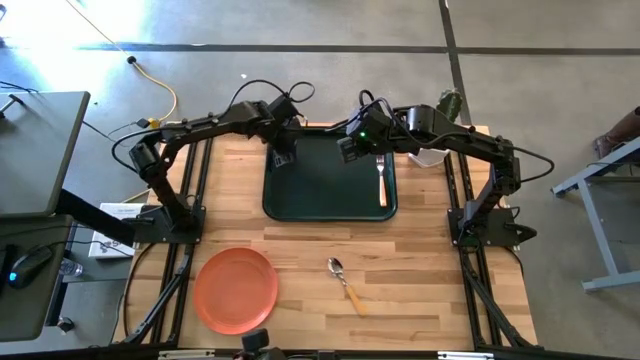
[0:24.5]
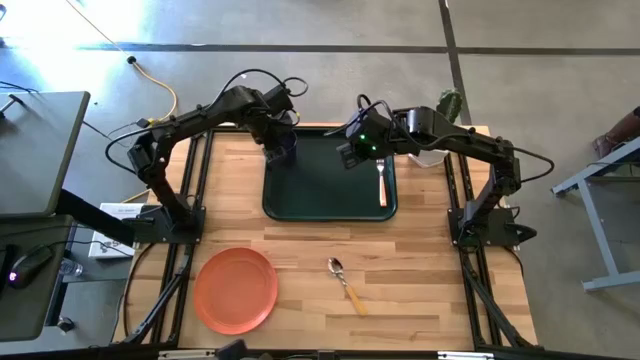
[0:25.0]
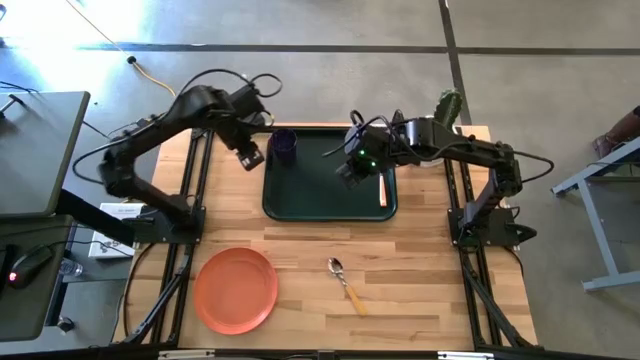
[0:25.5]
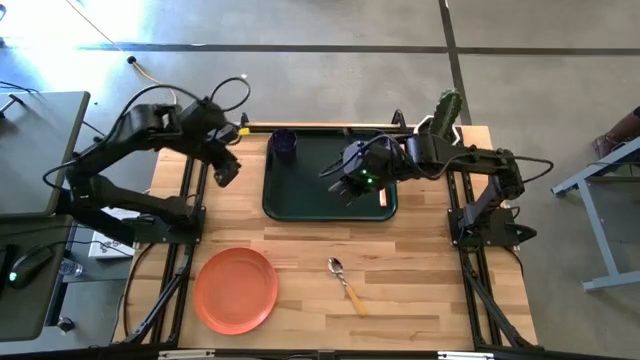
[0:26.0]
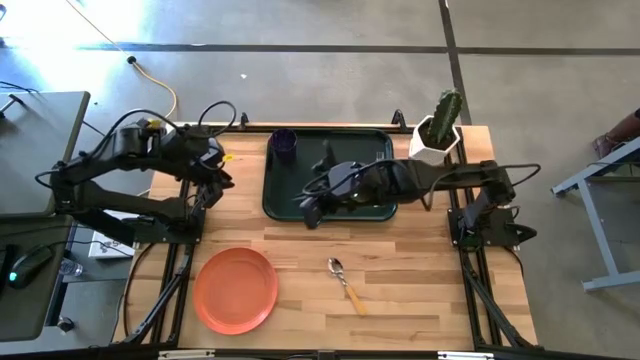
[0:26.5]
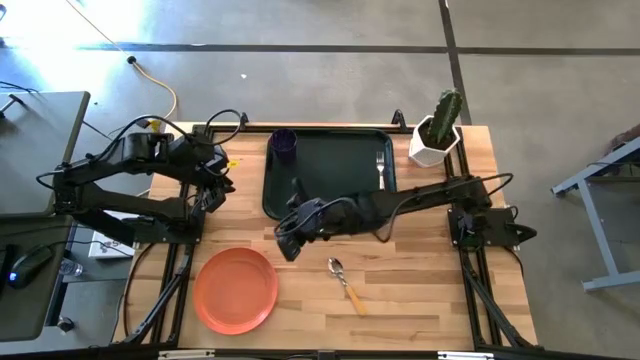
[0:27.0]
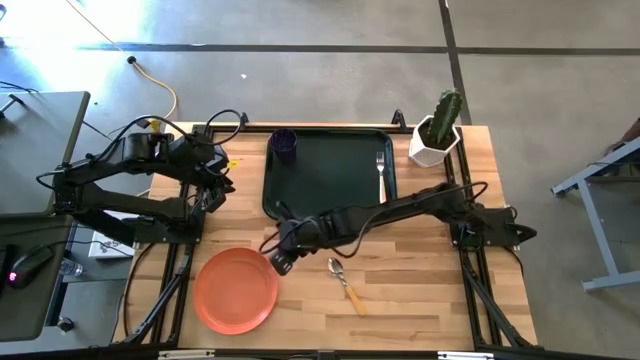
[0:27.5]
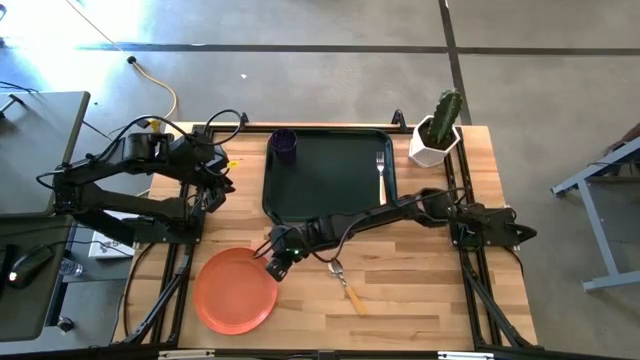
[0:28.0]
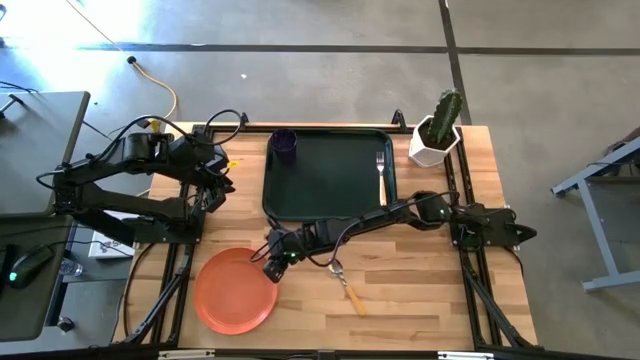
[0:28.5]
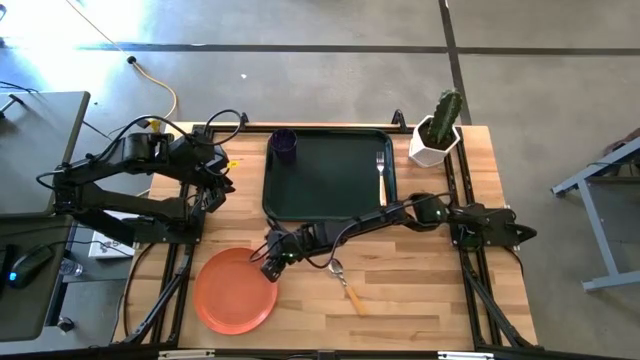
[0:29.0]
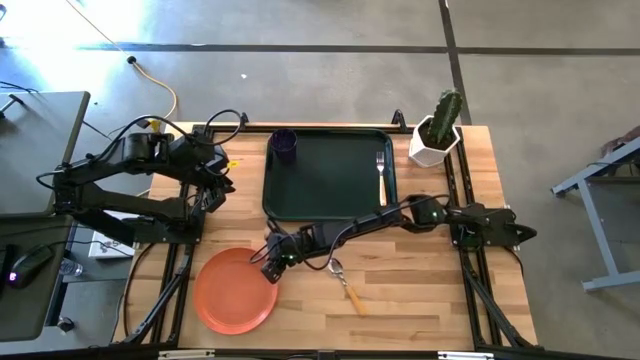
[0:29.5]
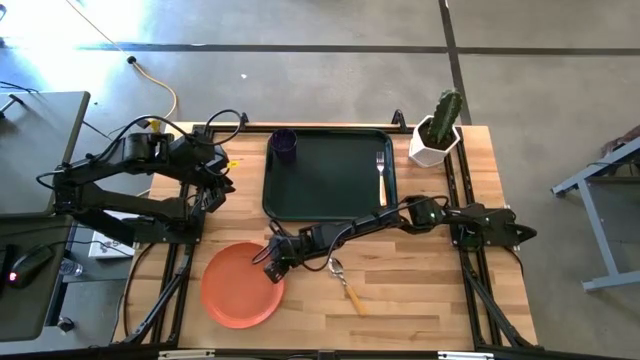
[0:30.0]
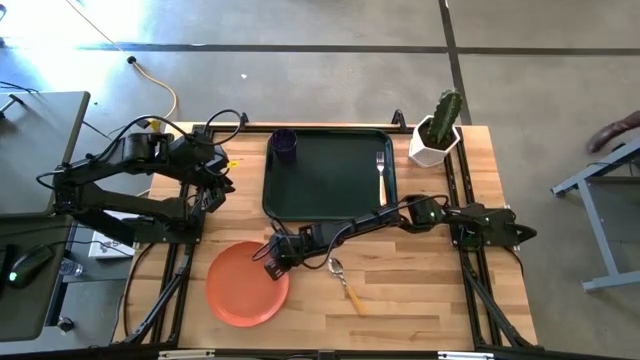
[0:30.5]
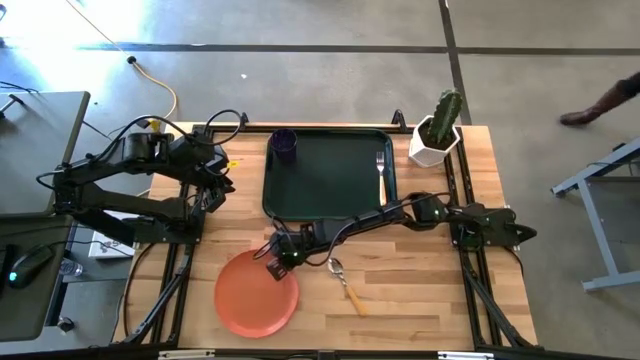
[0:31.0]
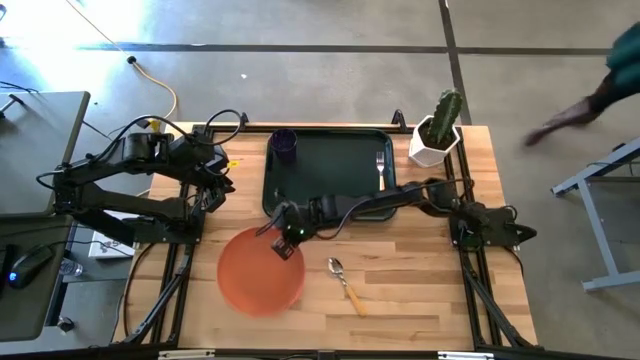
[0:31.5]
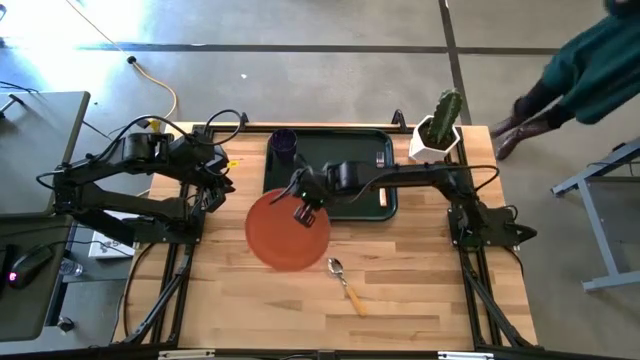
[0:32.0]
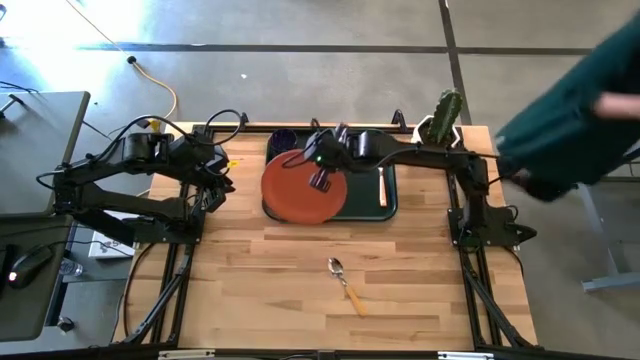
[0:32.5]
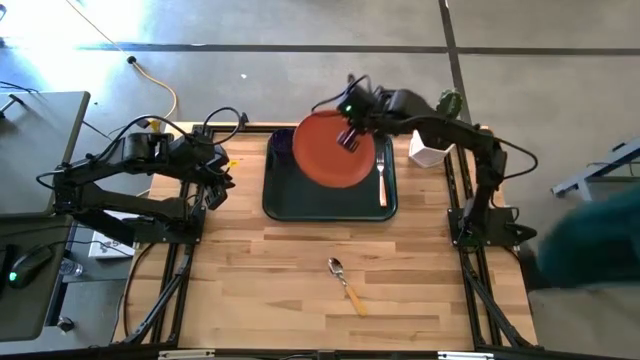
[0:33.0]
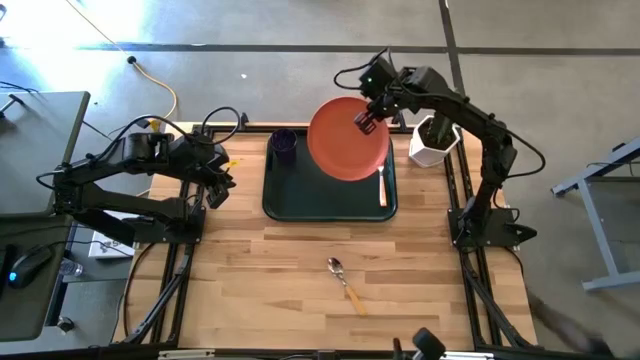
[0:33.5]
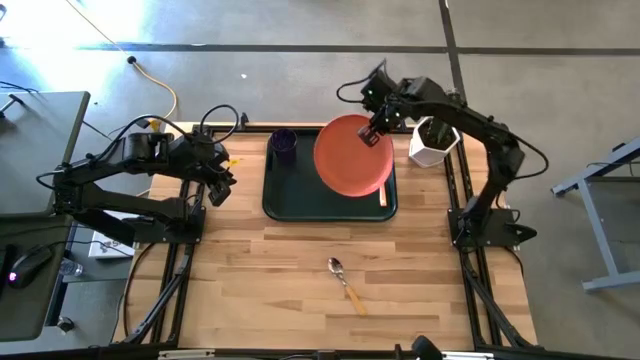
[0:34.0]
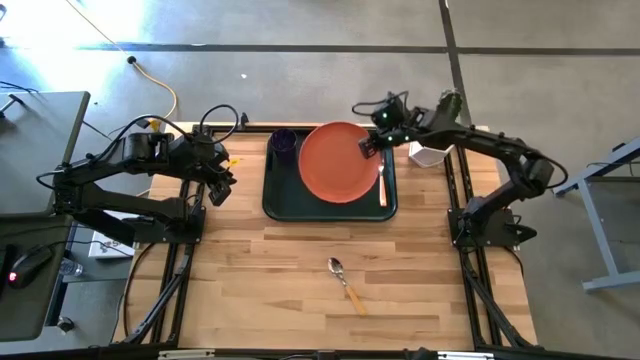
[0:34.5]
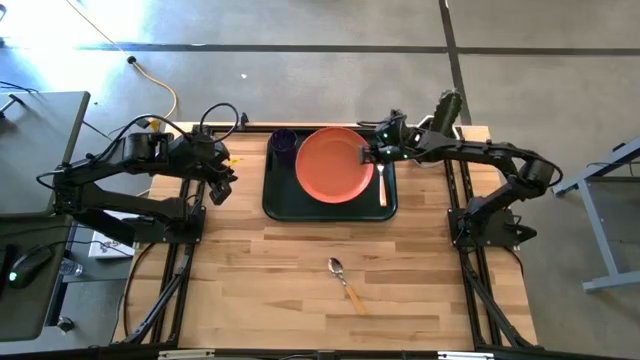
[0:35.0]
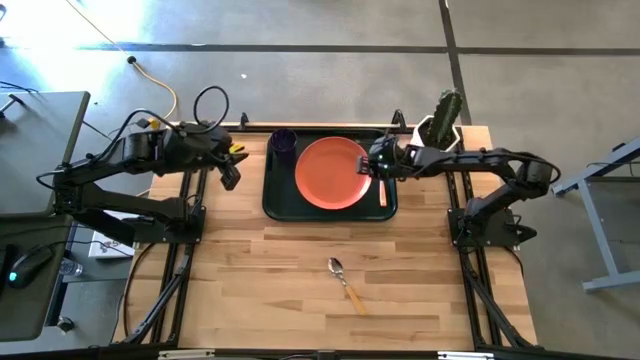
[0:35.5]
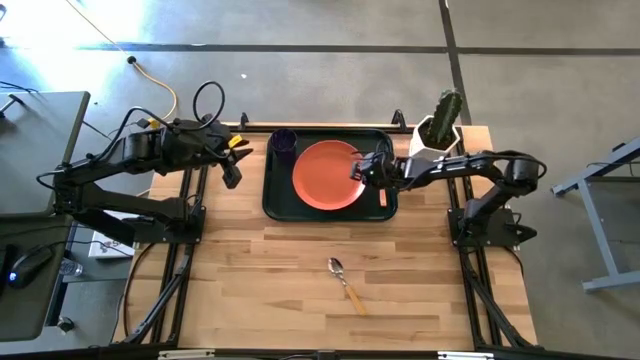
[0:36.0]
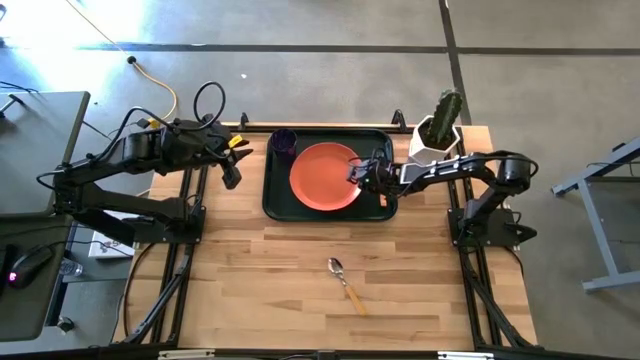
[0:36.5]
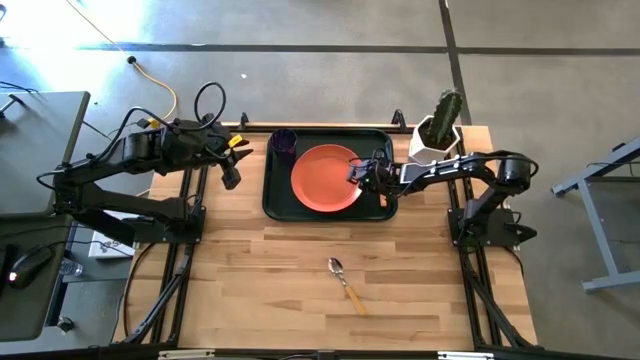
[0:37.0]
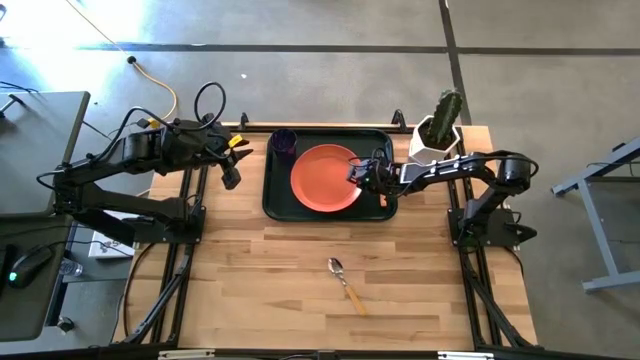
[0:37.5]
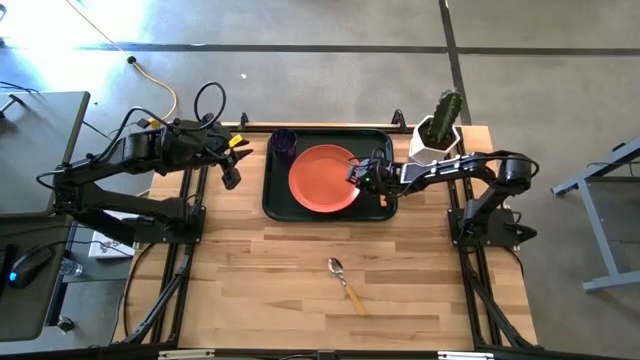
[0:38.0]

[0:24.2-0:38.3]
Task: Pick and place plate/cup/fork/spoon on tray
Put the orange plate on the serving tray

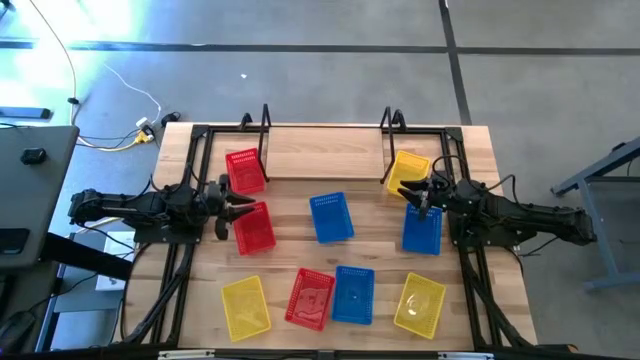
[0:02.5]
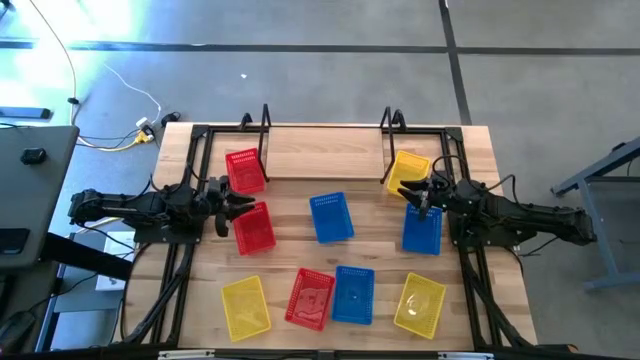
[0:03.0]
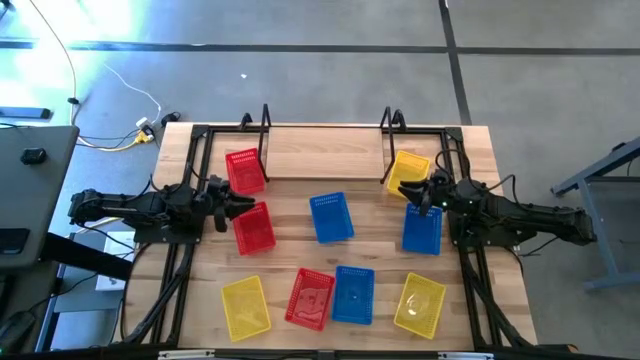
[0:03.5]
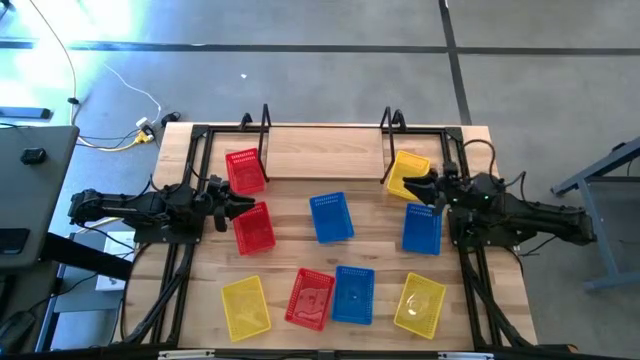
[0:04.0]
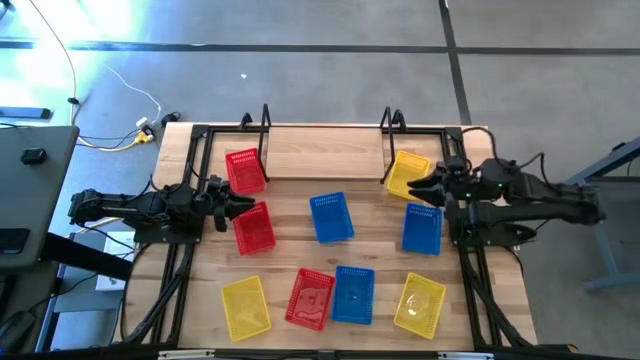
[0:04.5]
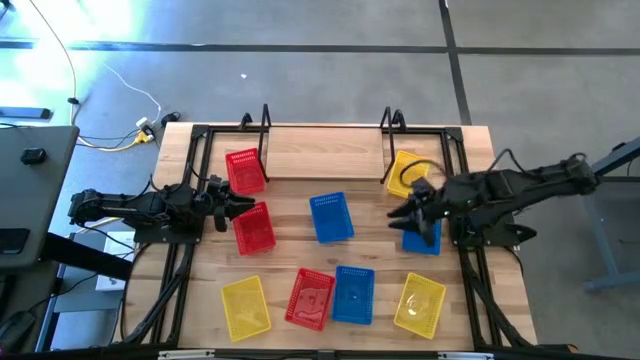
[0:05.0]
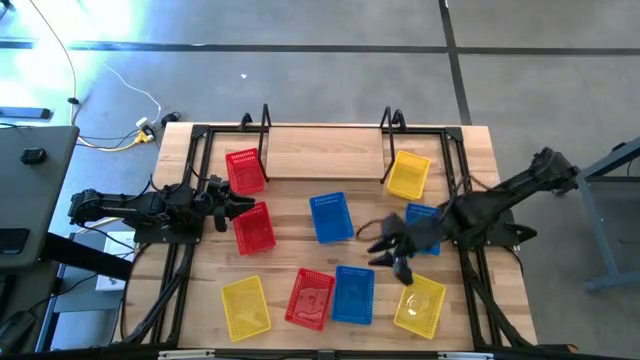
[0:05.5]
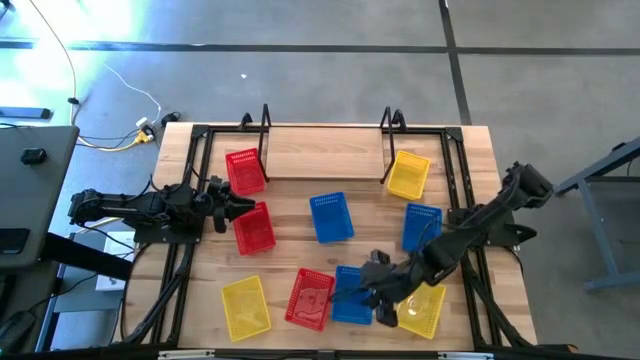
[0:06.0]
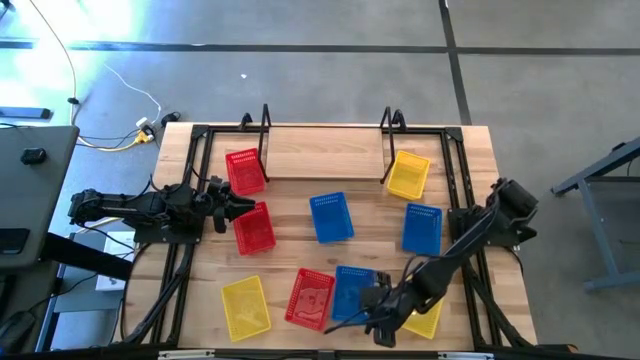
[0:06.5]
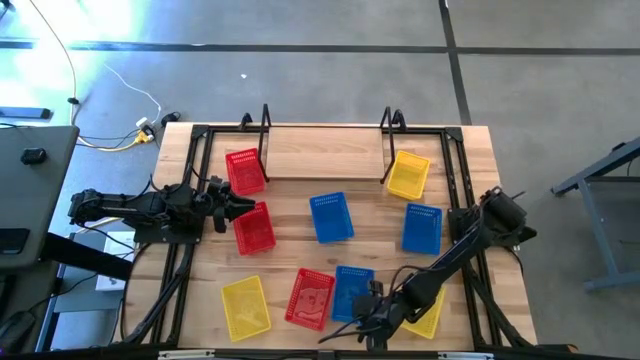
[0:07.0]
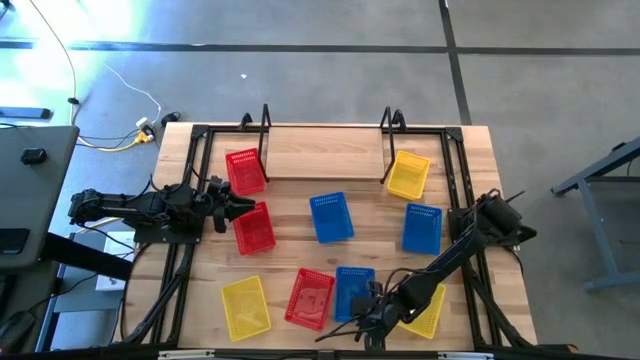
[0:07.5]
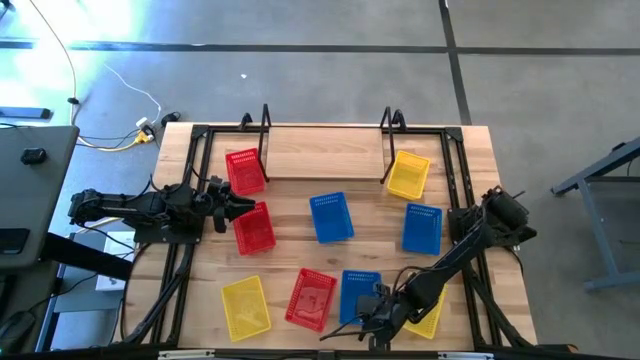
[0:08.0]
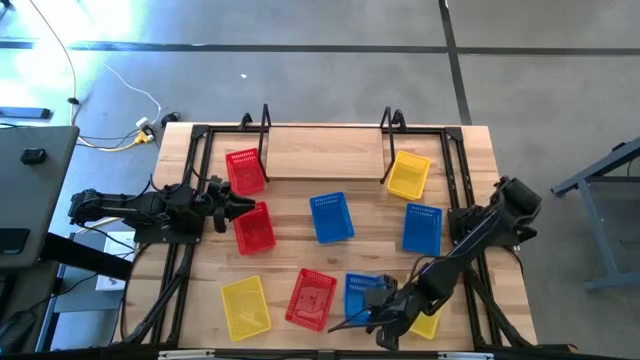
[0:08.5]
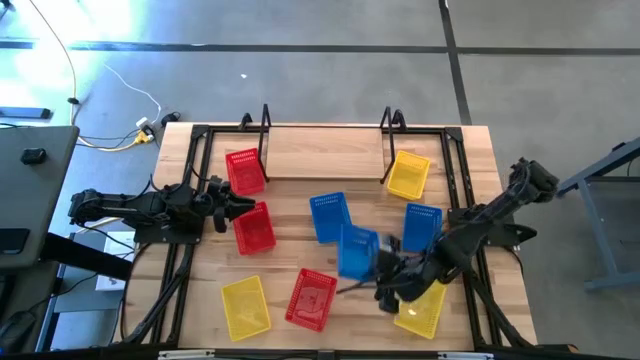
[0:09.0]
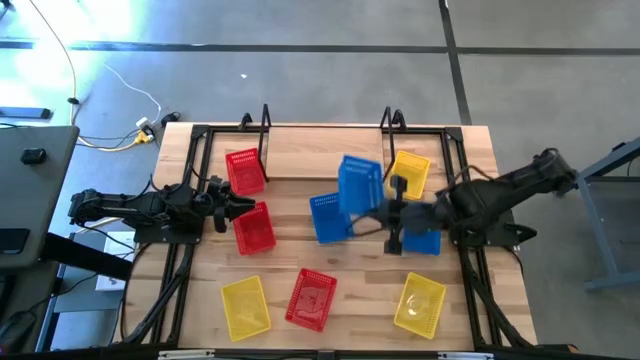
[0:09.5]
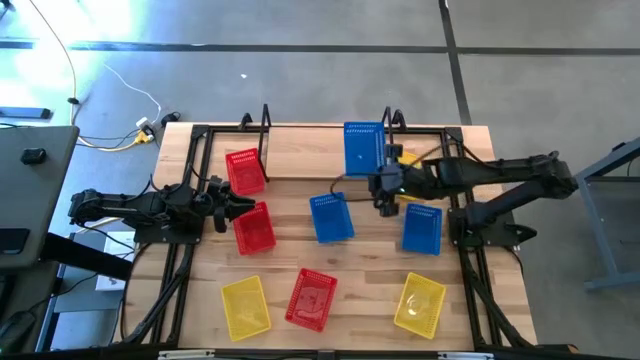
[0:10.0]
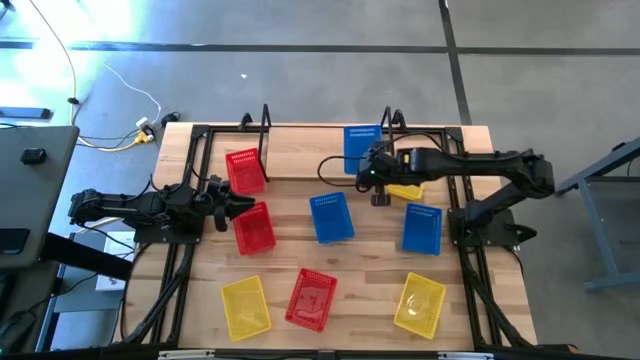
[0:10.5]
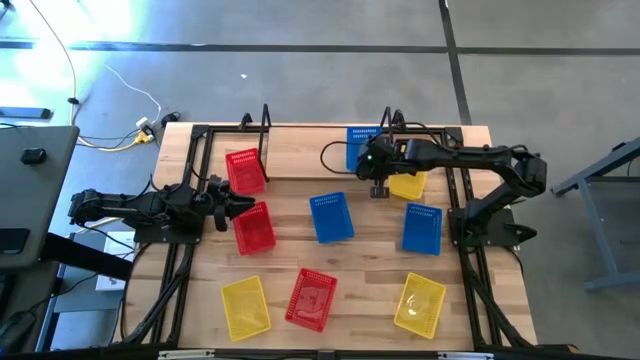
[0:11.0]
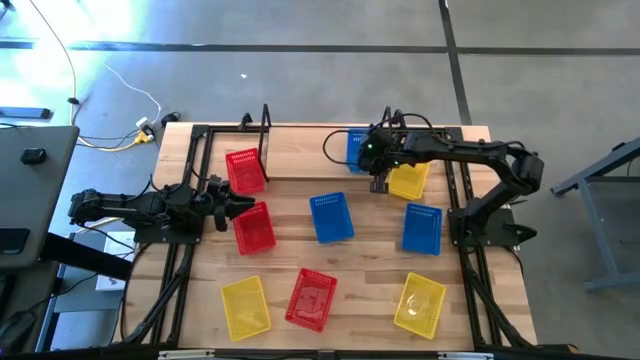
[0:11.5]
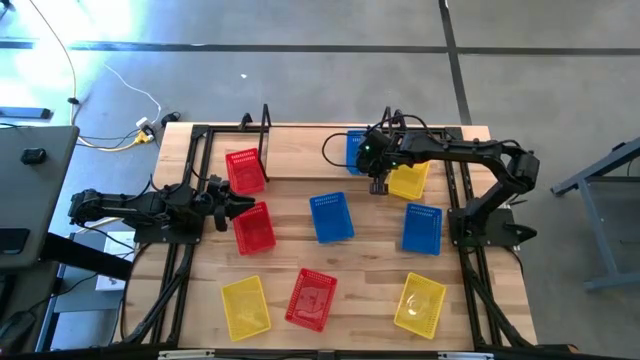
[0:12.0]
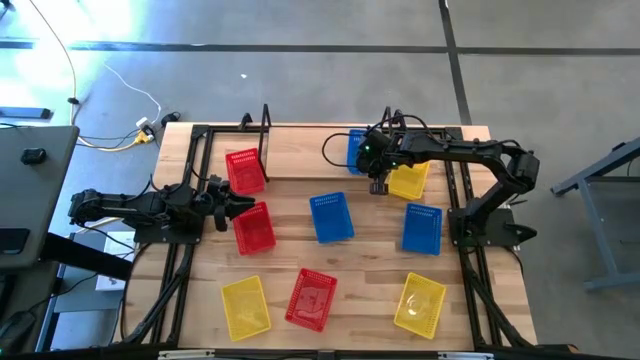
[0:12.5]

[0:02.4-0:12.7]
Task: Stack baskets on shelf by color
Put the bottom left blue bin on the shelf
